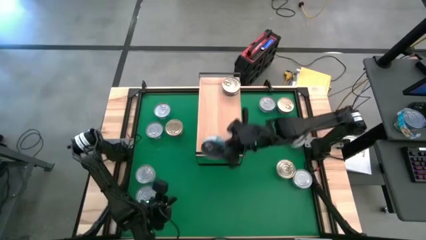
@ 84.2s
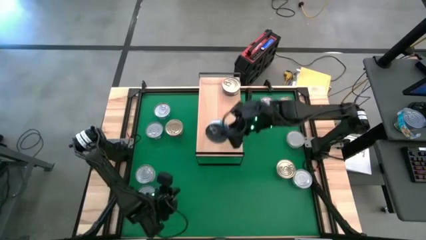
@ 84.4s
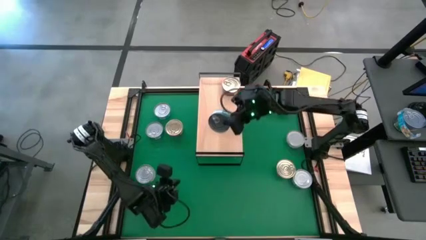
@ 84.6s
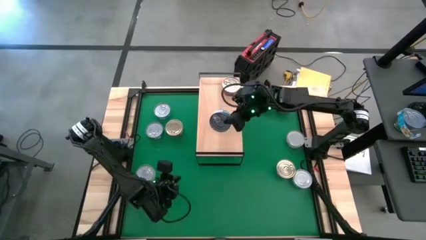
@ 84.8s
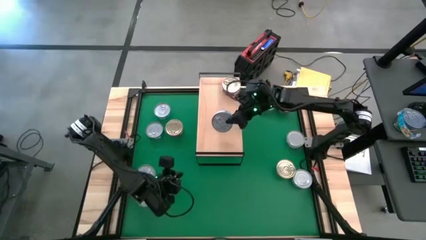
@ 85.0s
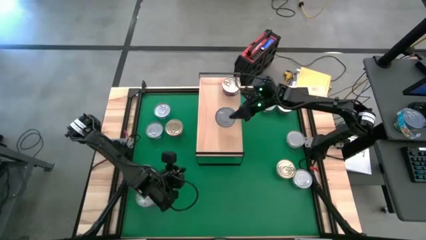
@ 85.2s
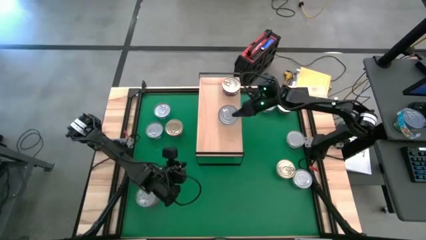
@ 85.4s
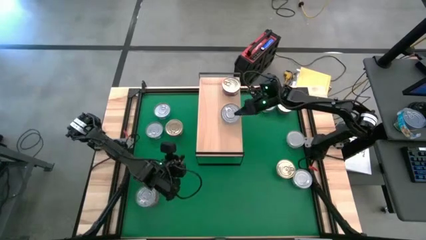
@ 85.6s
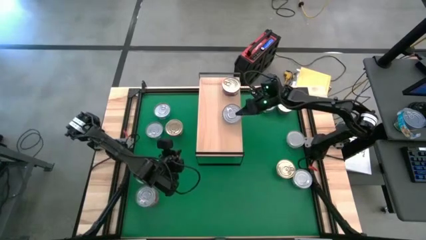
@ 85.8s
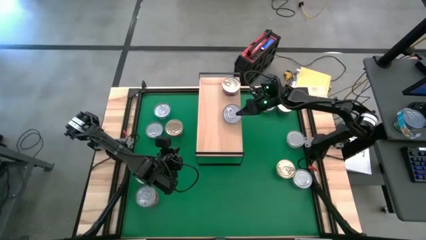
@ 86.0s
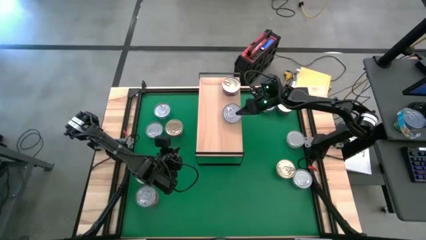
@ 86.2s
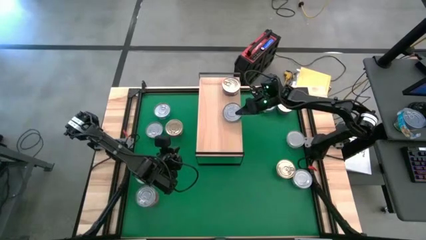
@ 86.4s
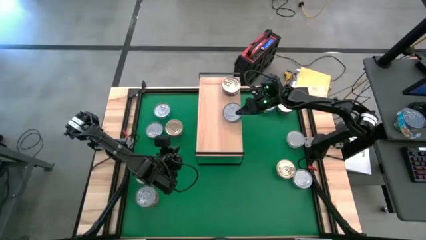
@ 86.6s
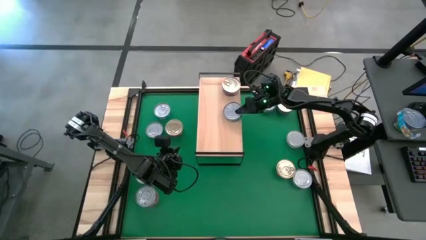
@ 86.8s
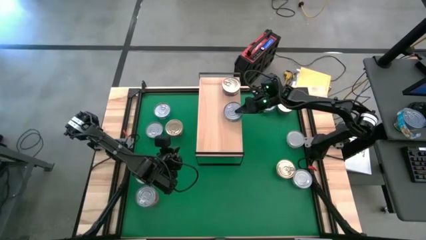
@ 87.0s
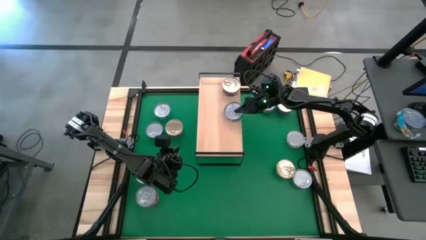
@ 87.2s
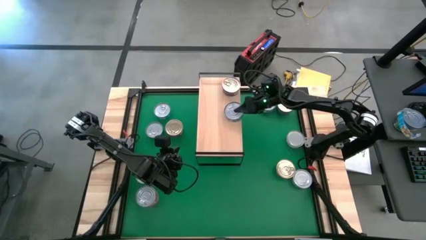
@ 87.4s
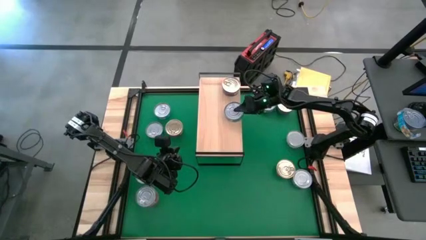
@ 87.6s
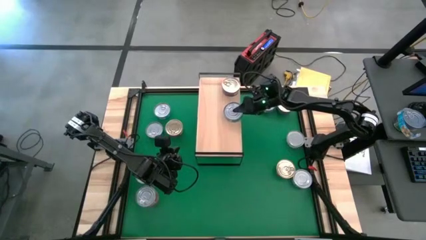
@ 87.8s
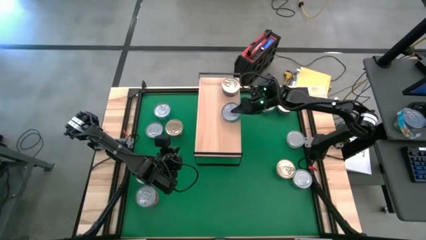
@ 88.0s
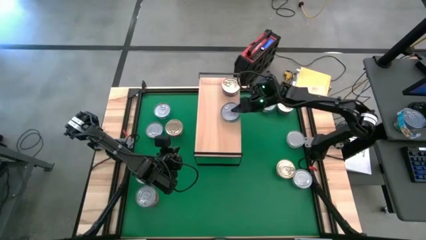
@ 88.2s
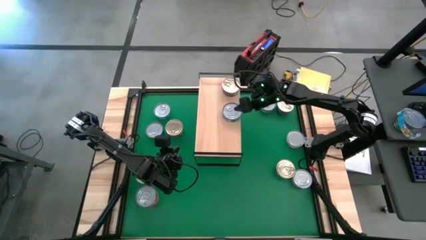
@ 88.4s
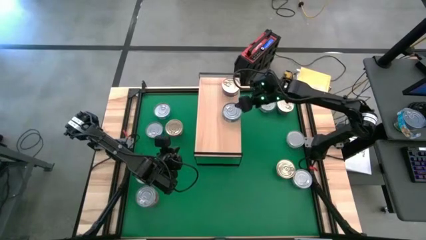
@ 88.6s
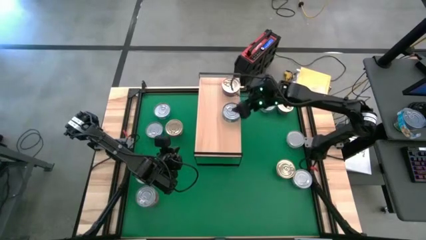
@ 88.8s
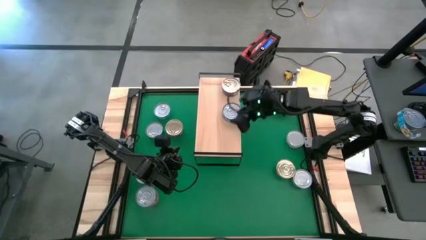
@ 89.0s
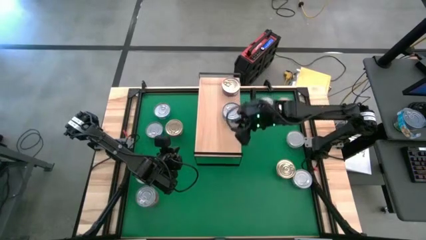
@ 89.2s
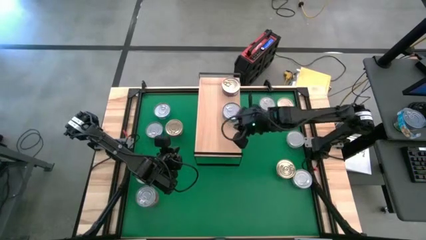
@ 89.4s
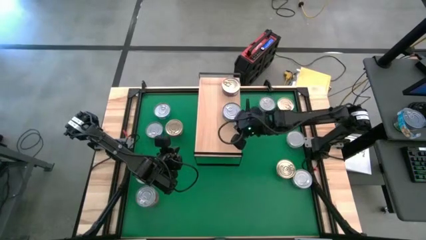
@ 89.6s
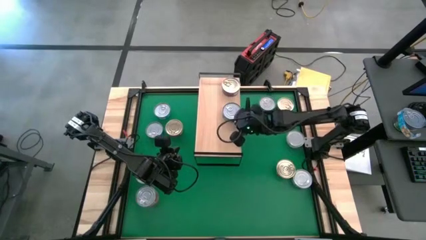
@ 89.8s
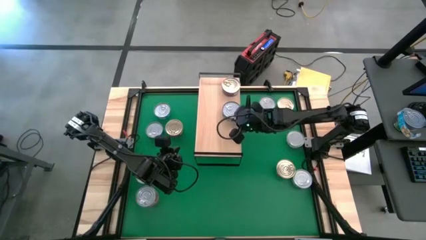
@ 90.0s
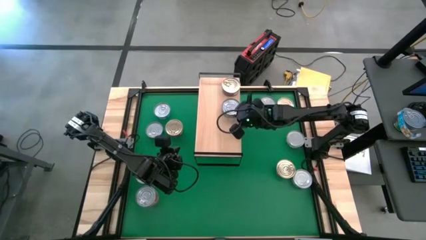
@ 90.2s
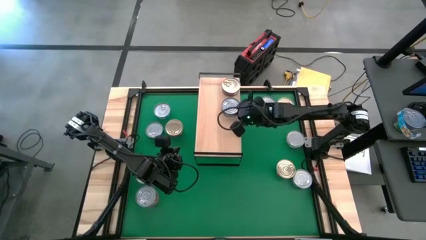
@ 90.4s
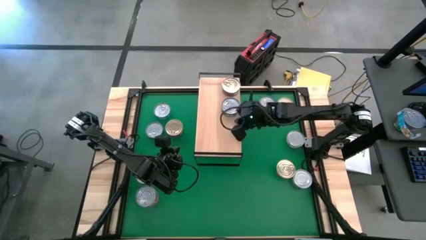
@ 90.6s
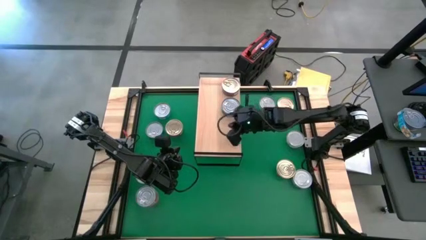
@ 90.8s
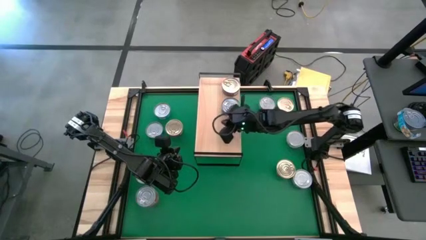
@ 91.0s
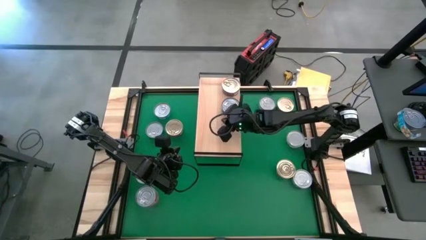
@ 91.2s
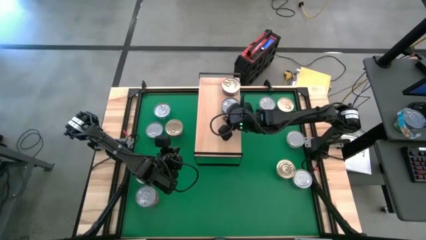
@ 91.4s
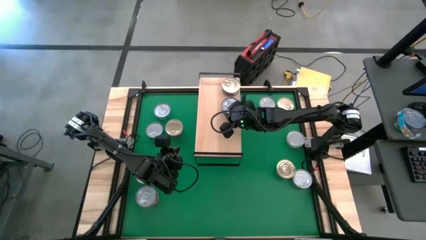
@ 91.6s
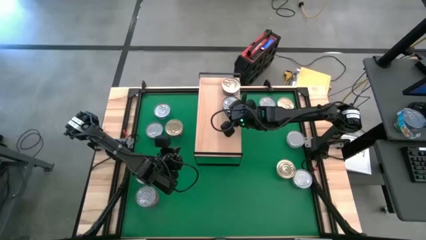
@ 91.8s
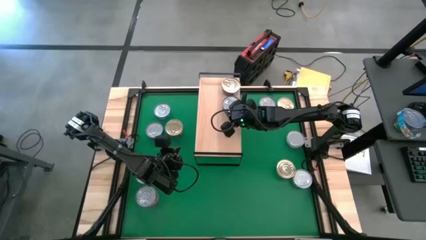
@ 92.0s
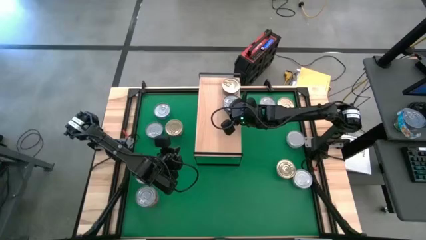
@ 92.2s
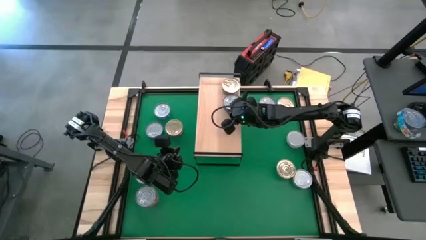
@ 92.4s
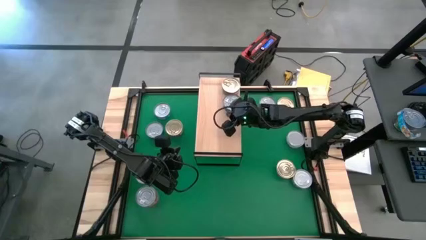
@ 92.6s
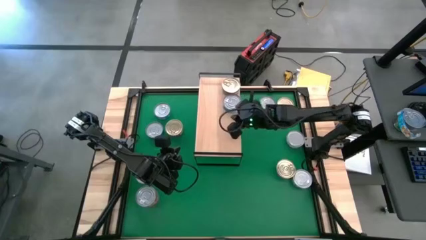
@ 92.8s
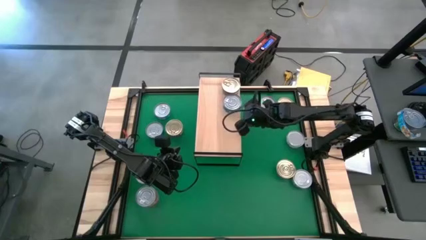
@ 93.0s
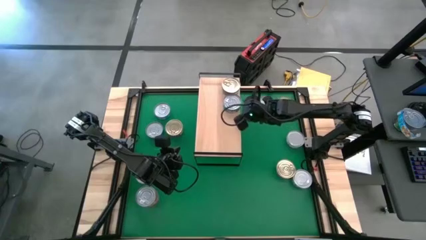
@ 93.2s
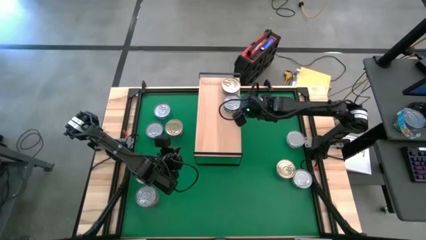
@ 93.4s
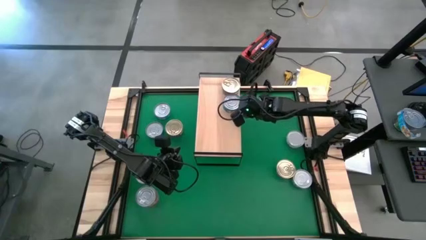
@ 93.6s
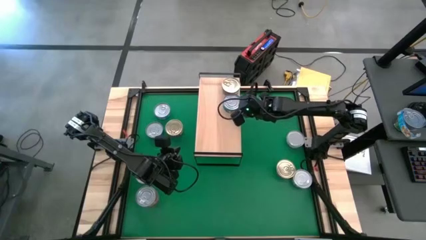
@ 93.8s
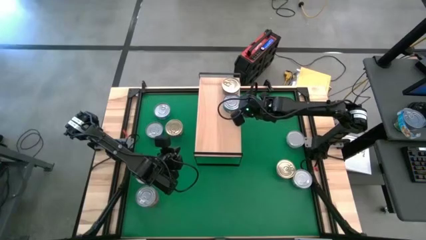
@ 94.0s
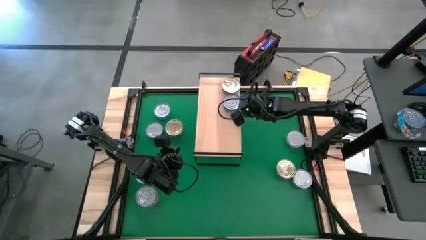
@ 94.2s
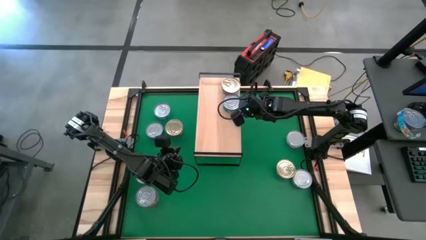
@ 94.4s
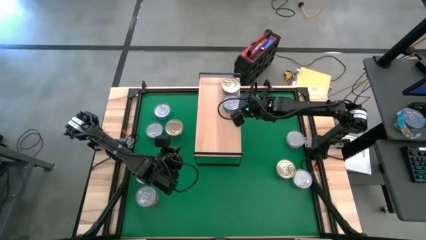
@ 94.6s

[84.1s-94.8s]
Task: Stack canned seafood by type on shelf
Put the bottom light blue tuna can on the shelf
